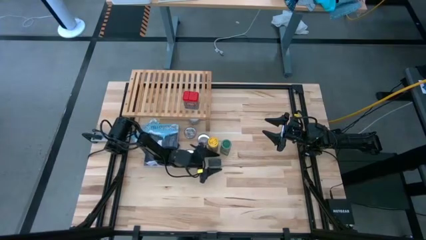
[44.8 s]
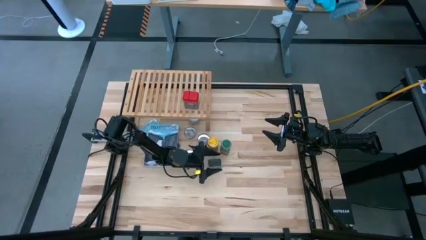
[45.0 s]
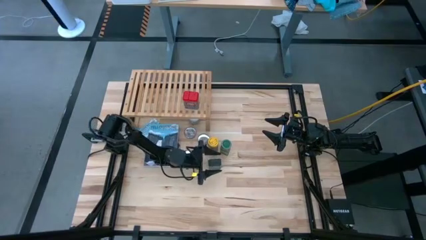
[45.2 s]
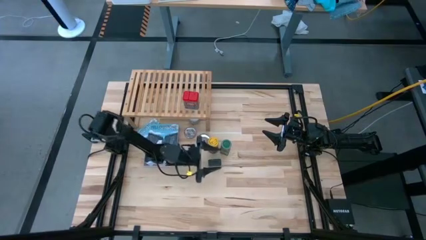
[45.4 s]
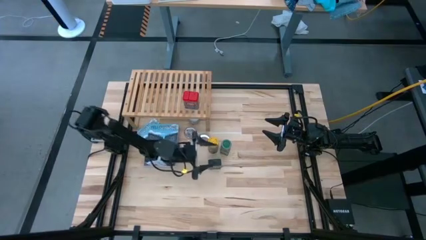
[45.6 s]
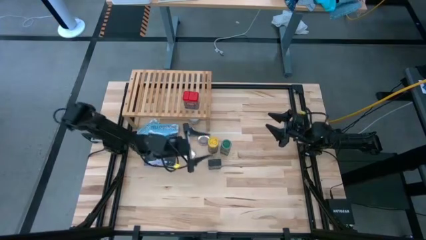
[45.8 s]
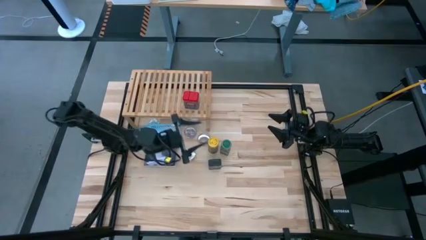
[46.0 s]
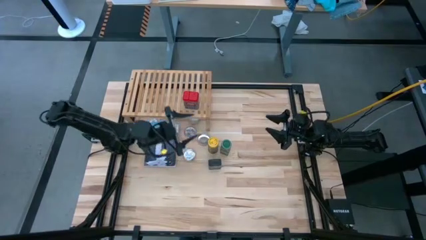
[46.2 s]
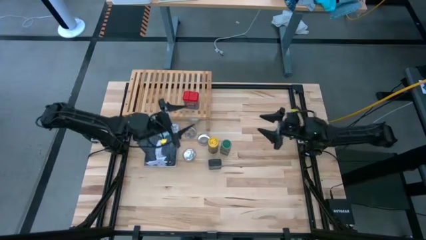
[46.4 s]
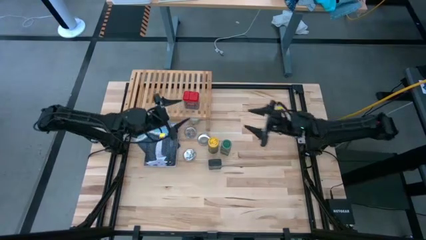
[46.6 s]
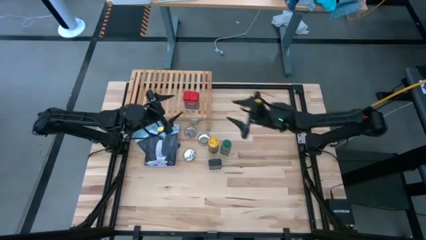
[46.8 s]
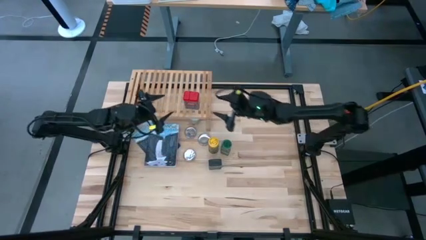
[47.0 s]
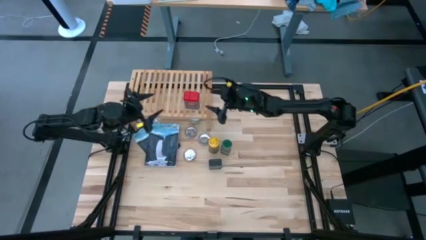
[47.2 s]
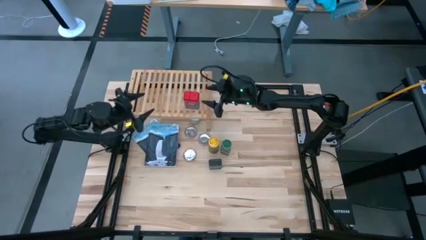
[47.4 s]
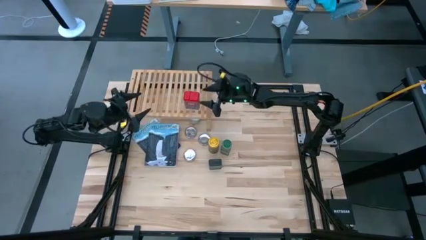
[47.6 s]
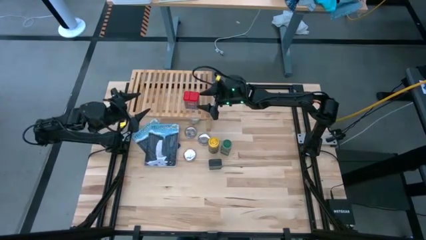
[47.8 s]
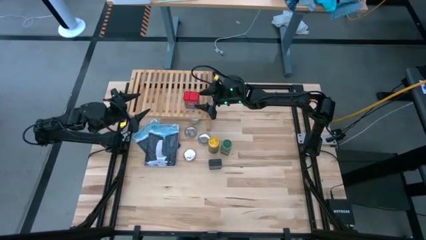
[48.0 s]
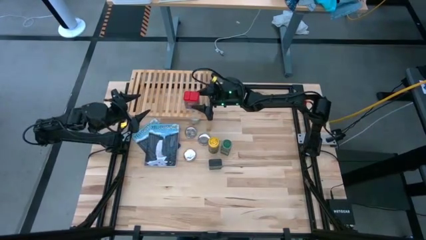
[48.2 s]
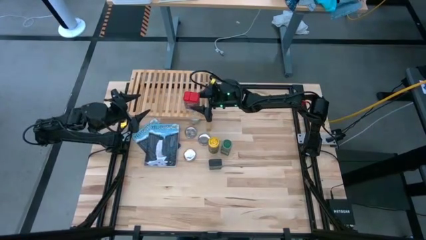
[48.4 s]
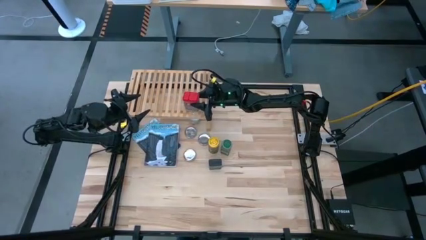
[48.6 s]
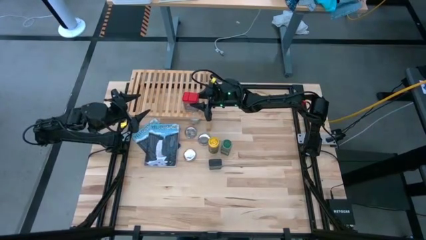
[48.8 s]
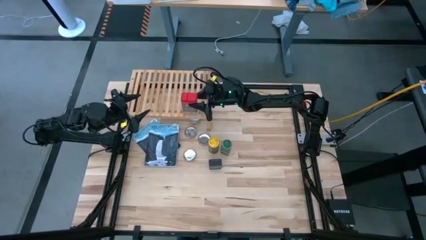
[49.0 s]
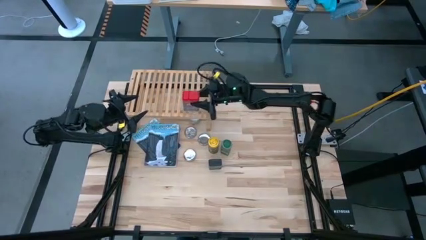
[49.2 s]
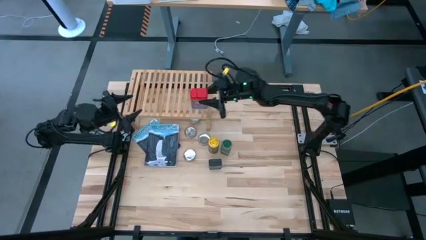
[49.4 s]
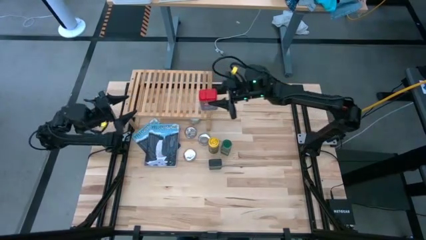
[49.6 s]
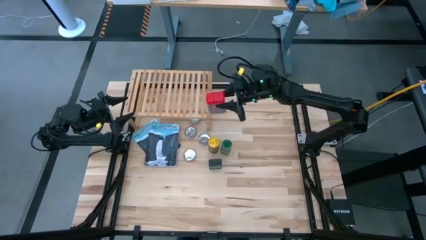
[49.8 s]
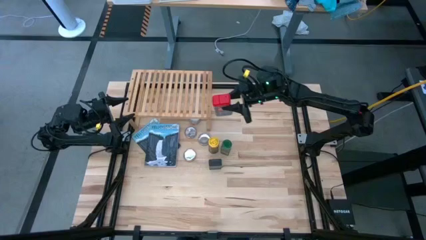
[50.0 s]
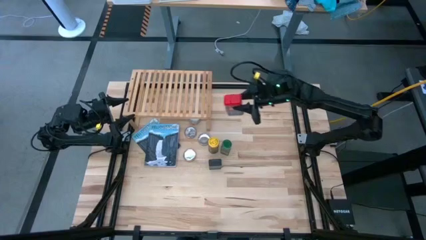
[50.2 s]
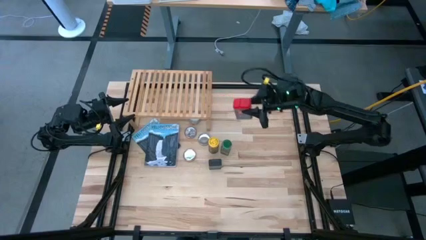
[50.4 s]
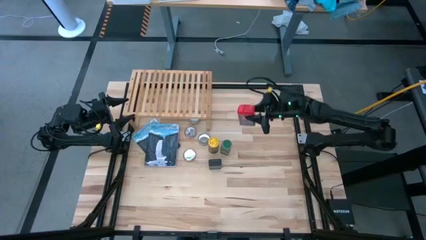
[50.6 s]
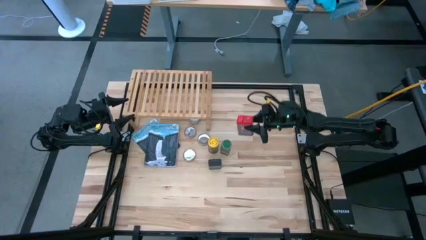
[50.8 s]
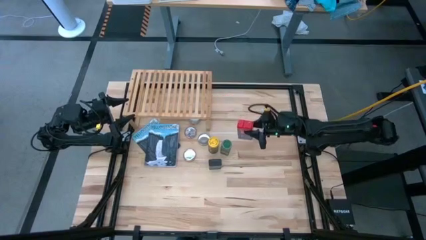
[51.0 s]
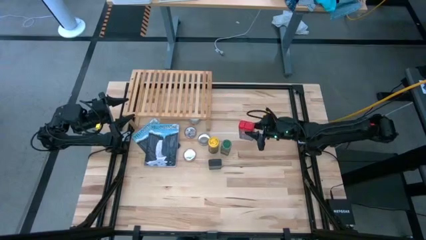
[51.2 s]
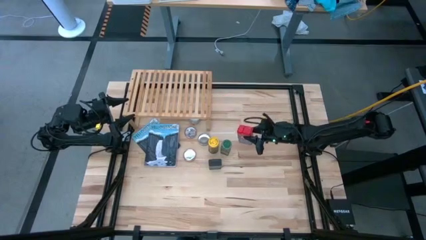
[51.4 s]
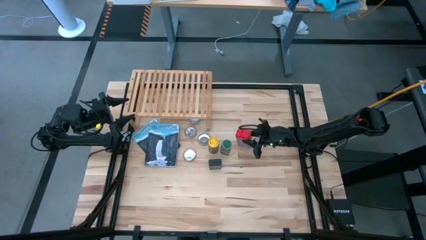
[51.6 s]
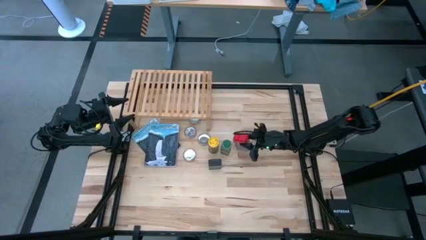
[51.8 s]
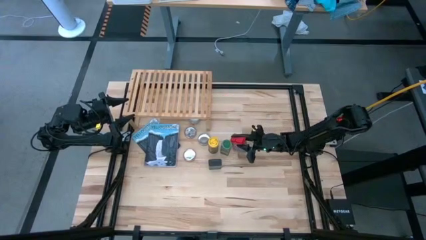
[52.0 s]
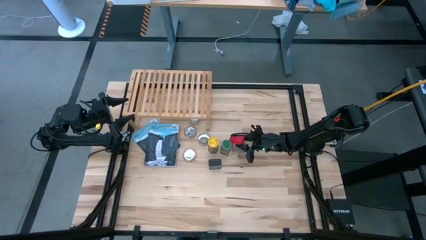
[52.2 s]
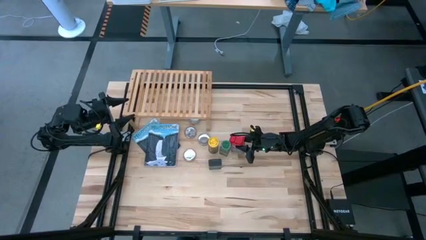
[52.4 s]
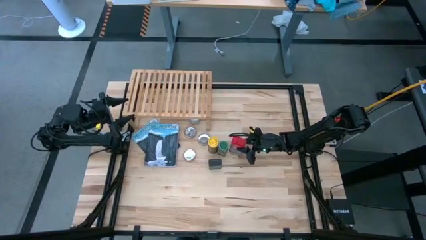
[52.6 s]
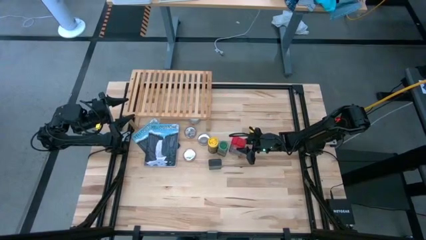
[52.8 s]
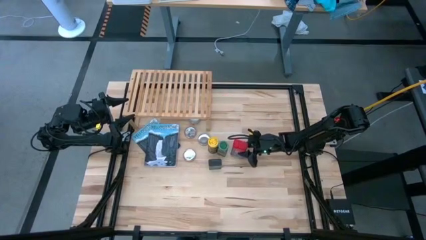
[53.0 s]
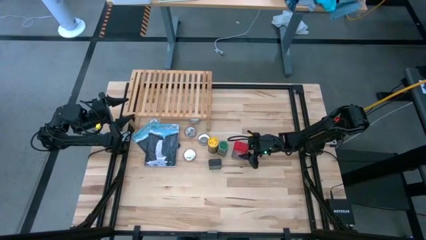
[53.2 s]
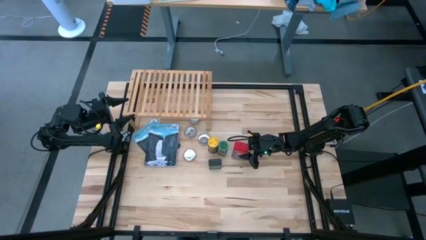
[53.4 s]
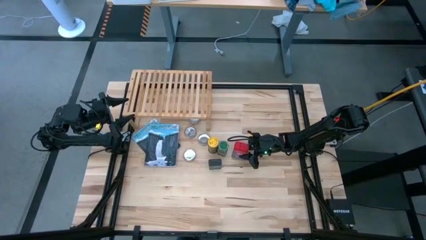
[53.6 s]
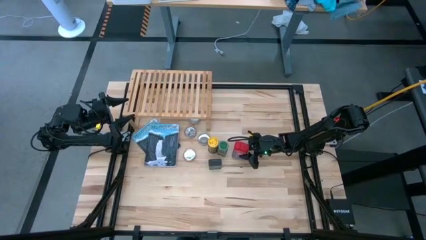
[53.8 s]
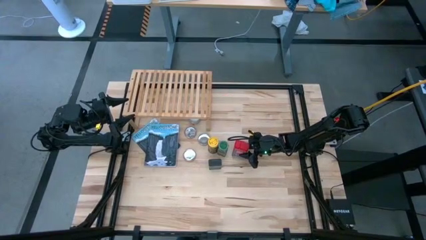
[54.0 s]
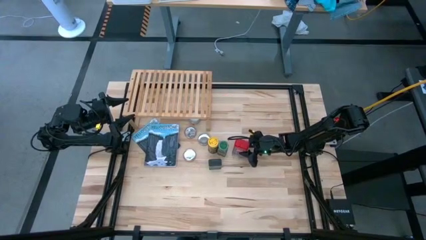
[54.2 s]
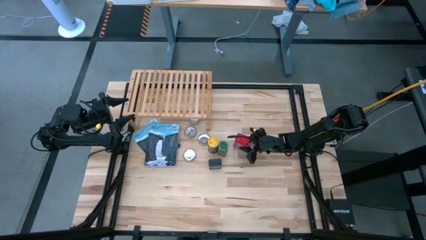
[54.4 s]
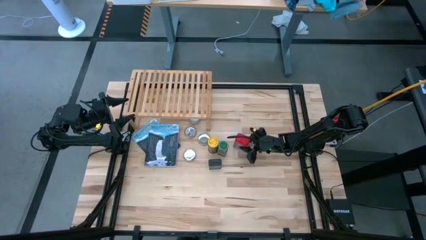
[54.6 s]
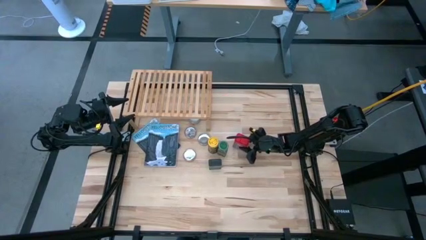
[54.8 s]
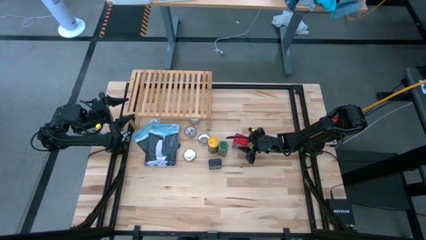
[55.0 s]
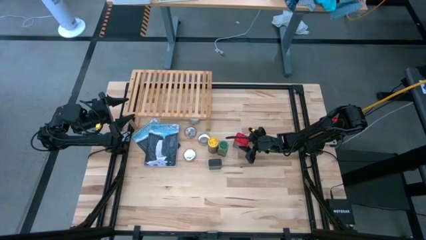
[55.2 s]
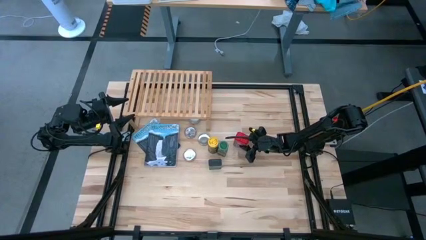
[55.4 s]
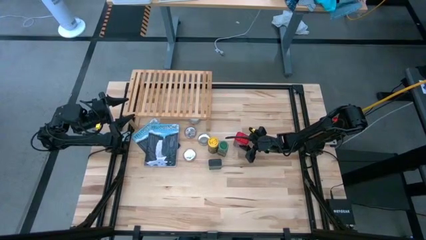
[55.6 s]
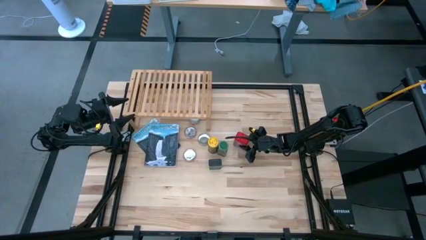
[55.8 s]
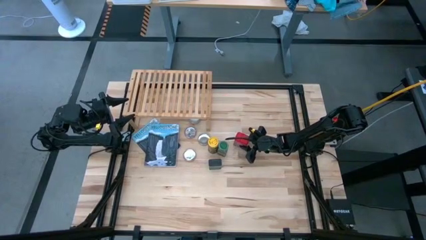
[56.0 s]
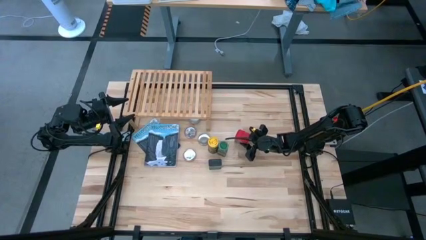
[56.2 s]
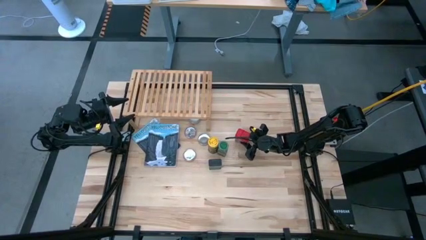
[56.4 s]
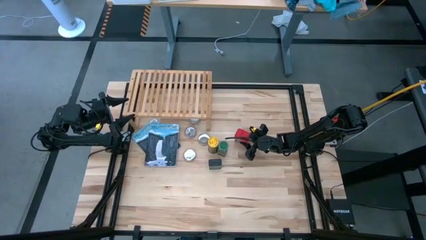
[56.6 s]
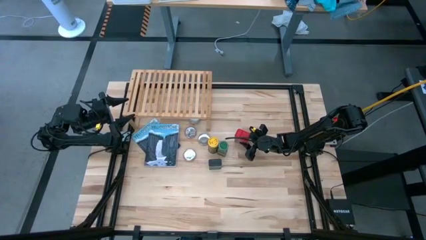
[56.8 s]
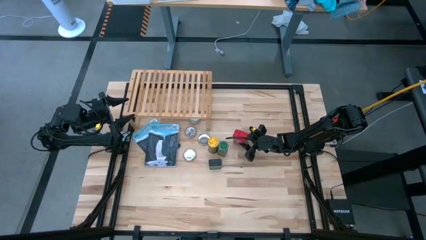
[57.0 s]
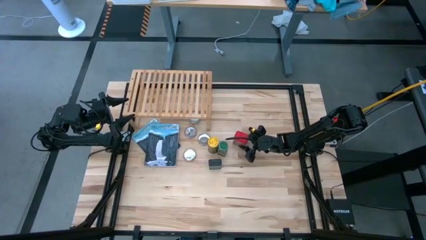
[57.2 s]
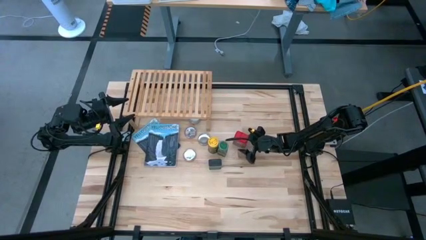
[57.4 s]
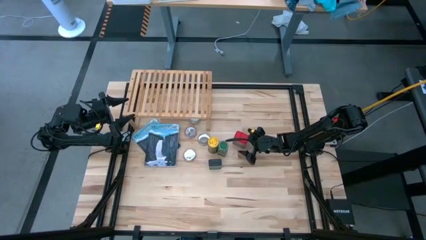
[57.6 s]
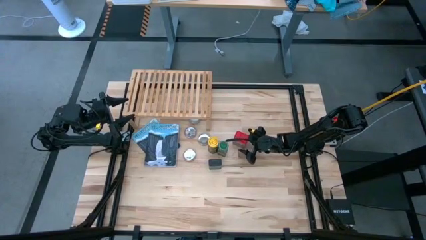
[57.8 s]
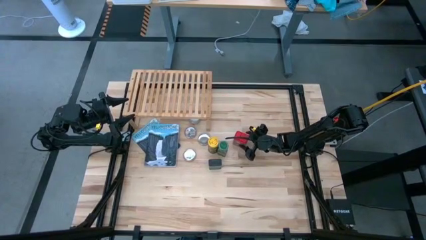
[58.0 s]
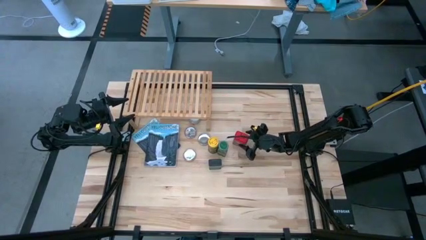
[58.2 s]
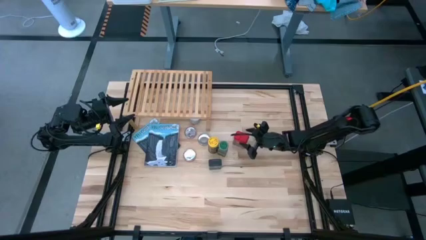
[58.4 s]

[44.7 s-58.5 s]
Task: Shelf spices
Remove the red seasoning can from the shelf

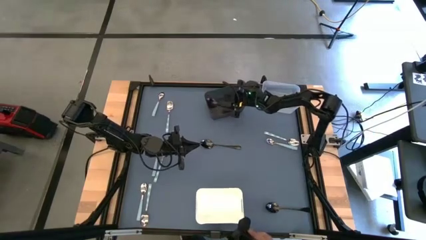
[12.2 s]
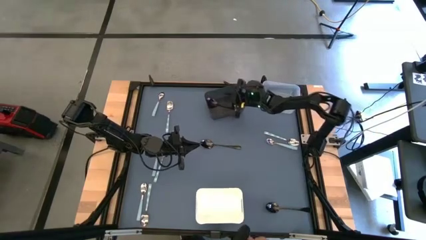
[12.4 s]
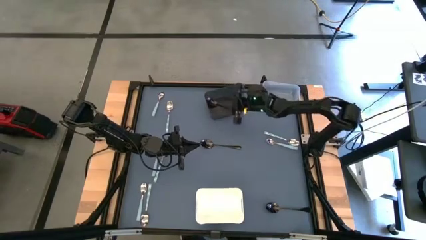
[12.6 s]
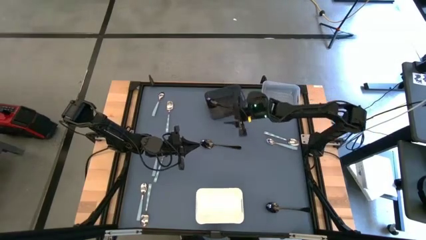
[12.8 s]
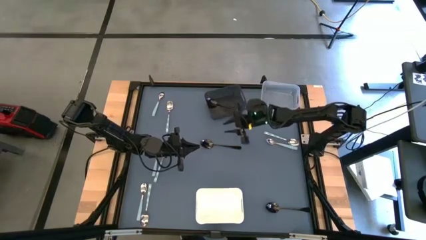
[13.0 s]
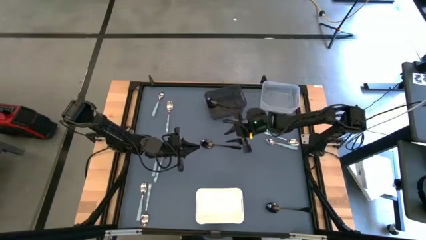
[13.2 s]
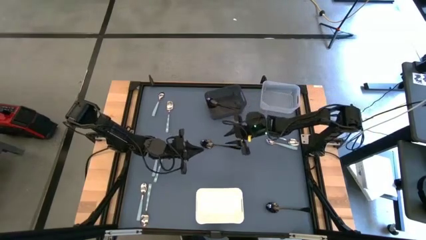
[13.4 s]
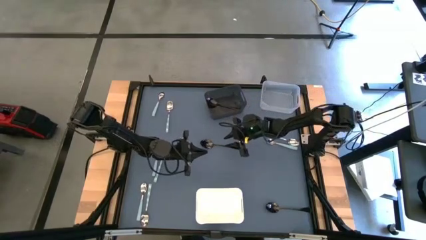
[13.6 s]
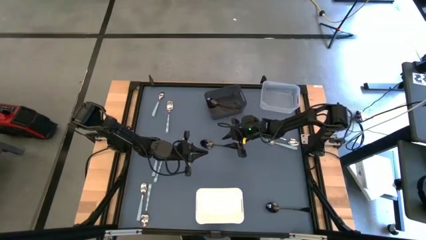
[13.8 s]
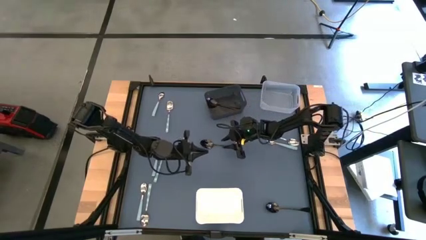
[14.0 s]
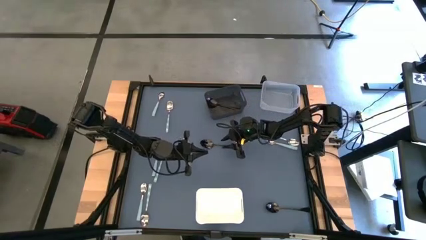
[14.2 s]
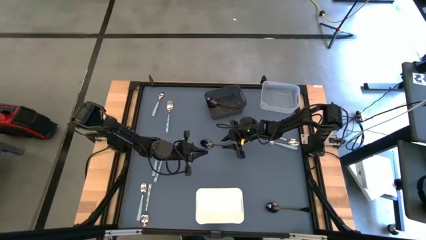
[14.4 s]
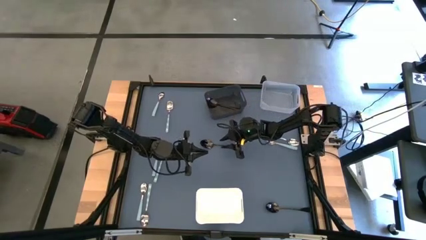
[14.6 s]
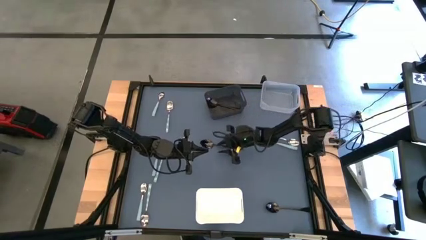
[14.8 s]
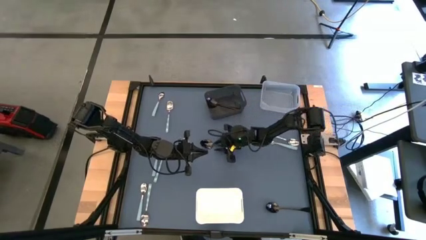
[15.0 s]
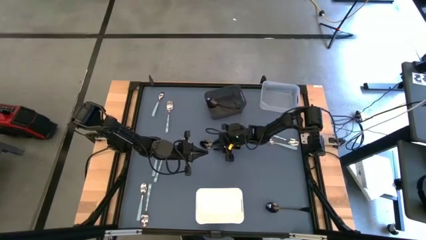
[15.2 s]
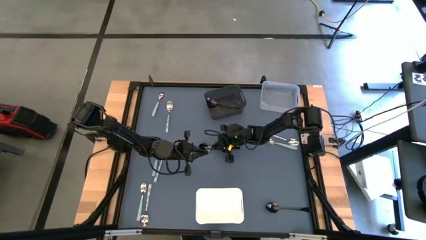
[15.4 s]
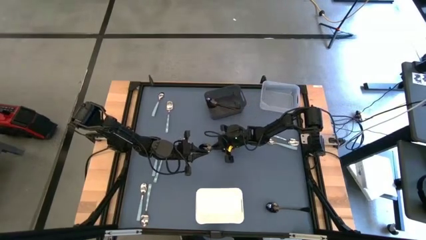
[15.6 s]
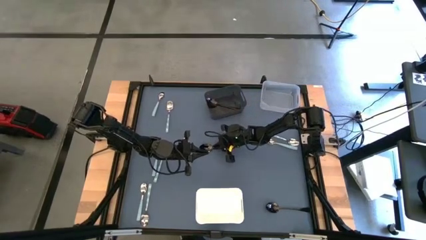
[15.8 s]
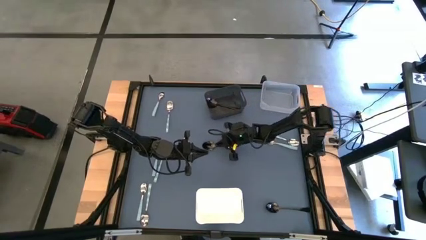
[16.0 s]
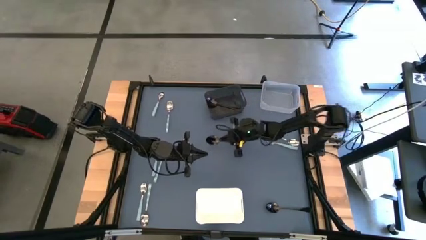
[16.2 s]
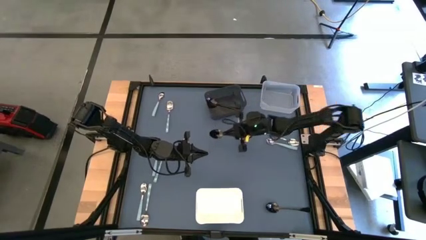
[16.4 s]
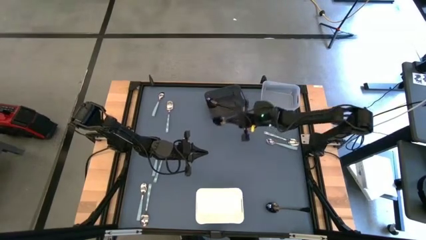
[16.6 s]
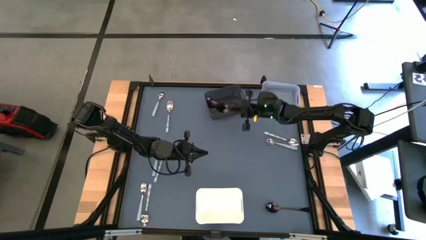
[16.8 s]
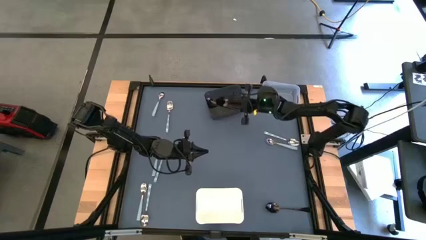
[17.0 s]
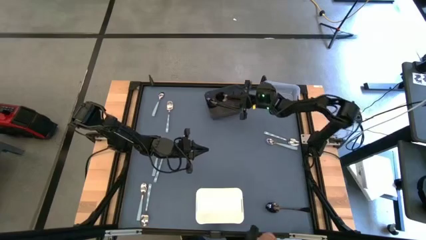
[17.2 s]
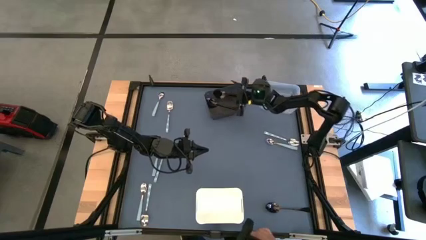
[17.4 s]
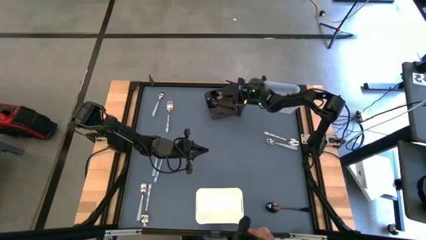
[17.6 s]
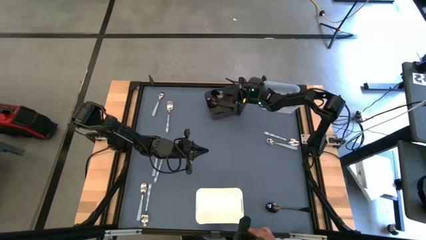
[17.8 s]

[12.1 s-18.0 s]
Task: Sort silverware by color (type)
Put the black spoon into the black bin
